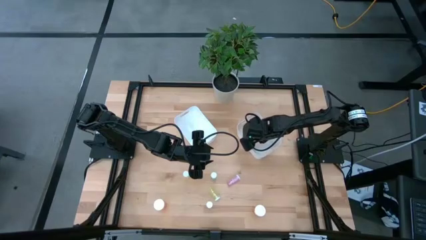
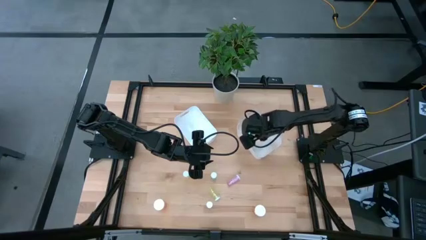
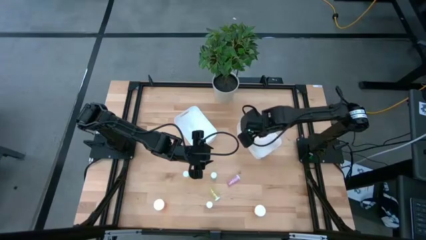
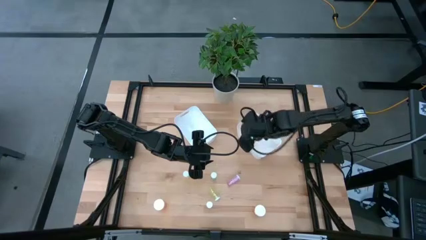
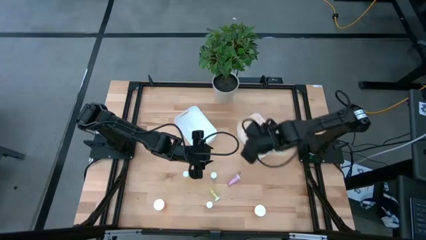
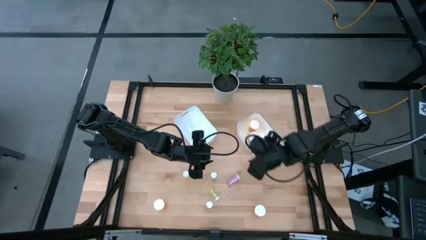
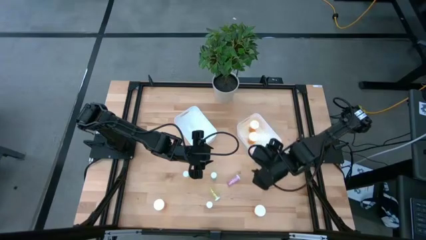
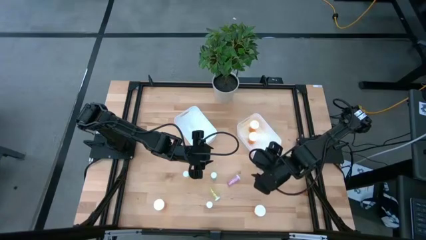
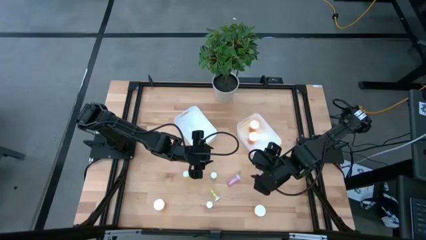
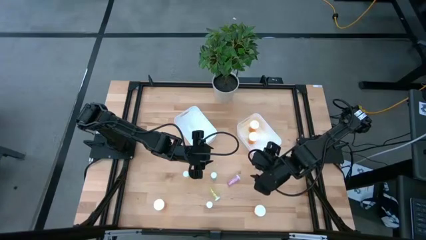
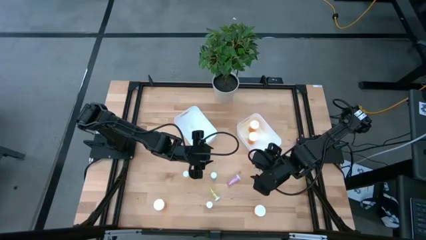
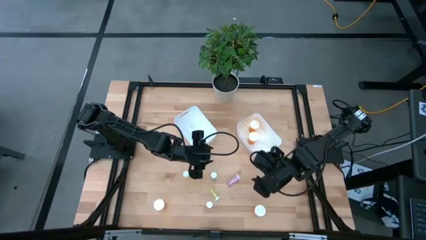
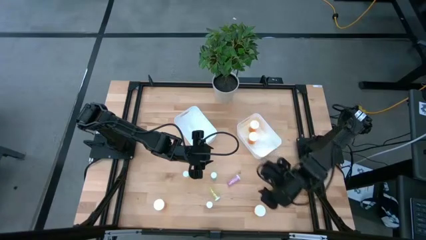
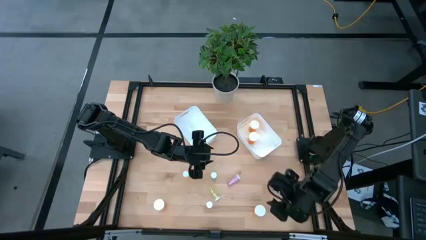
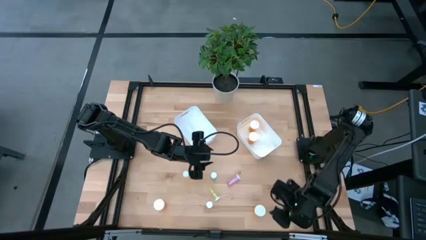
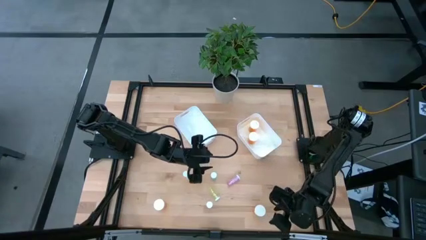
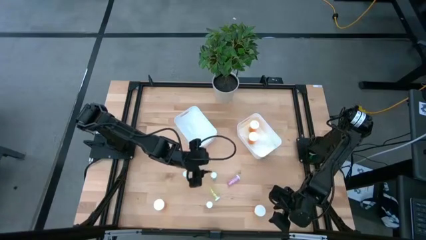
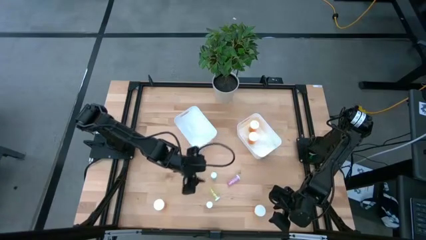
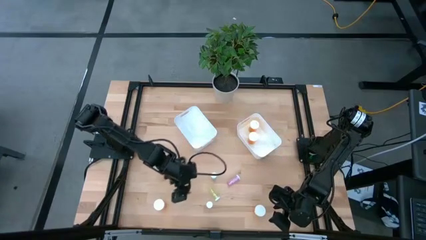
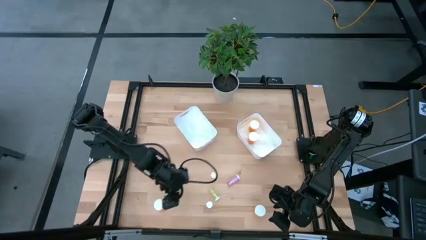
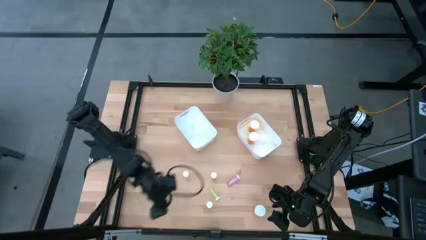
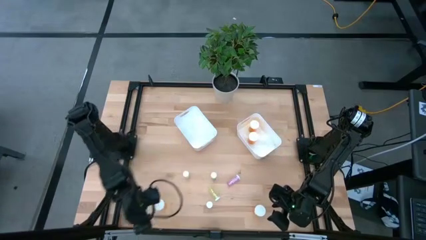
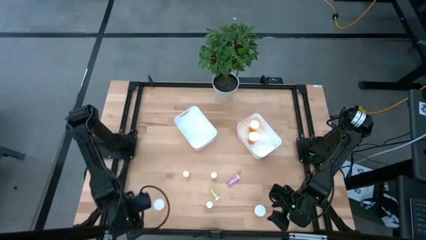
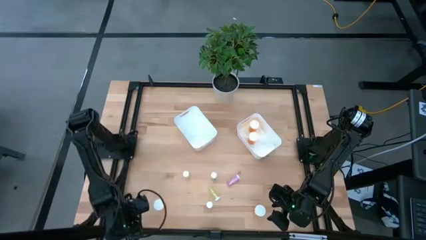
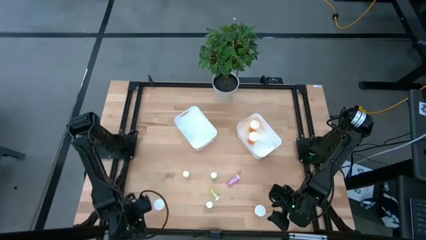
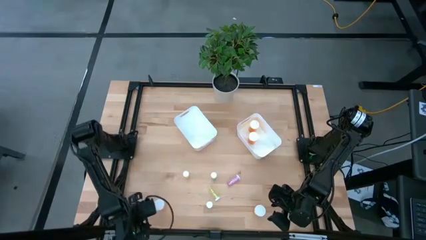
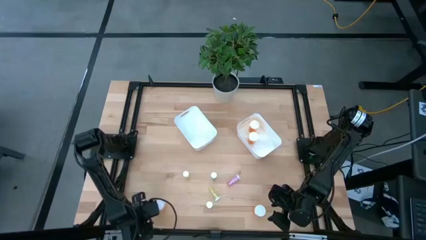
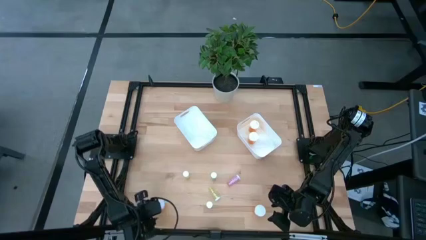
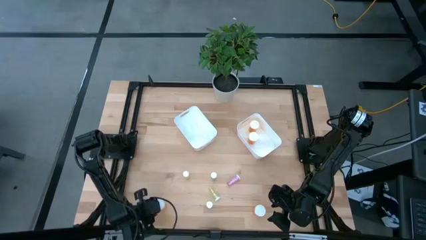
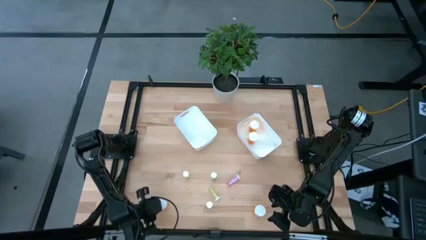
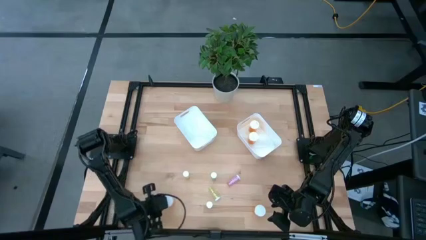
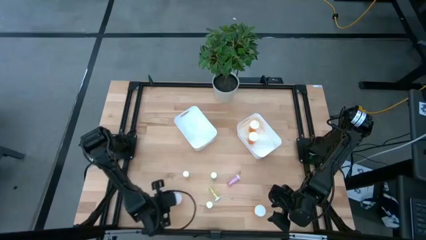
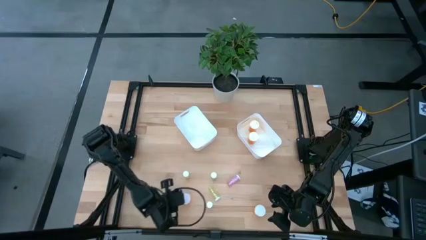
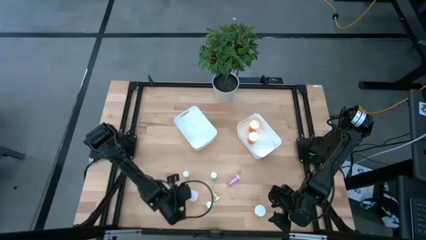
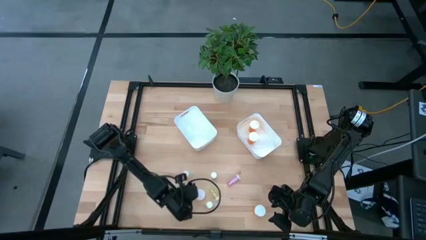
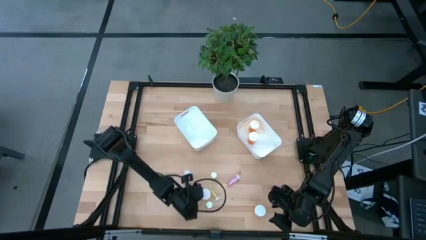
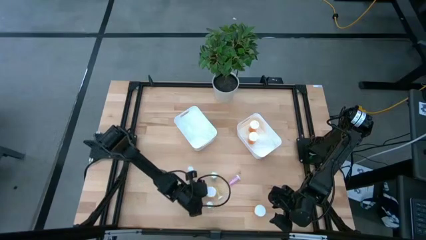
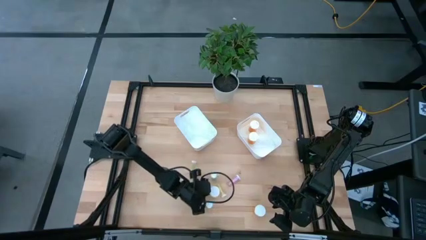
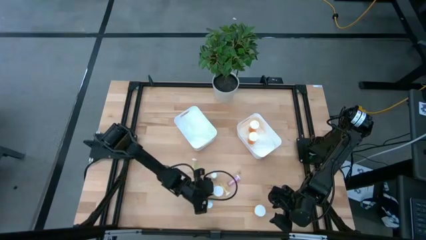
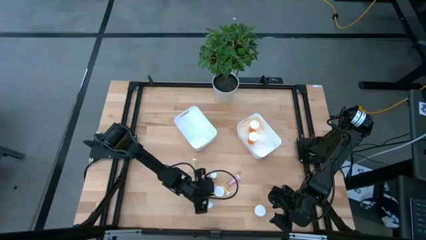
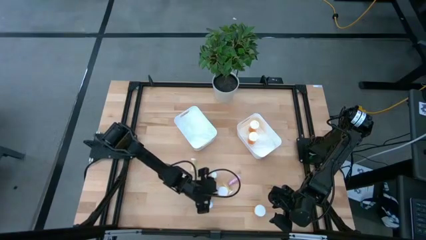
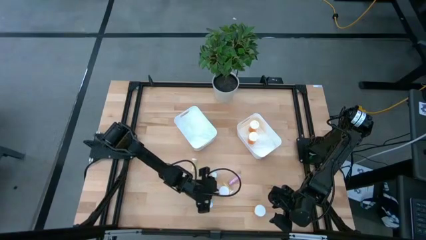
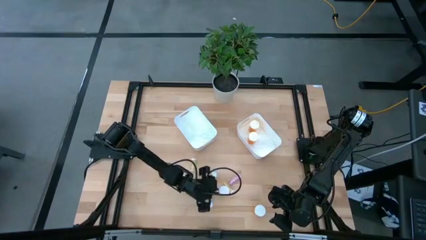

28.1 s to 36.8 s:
Task: Pick and place medicine bottles into bin by pill shape (circle, oval)
Move the left orange pill bottle to the bottom center of the table

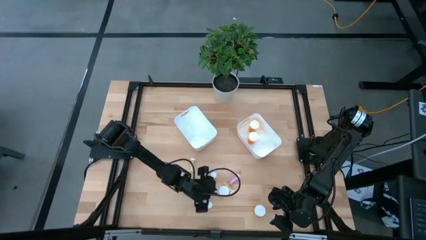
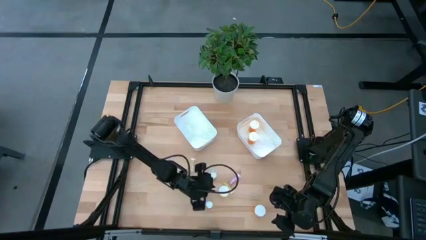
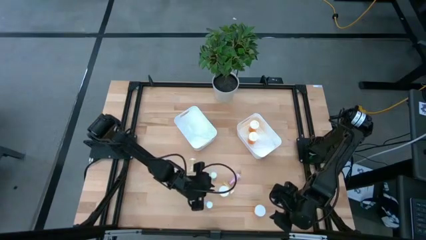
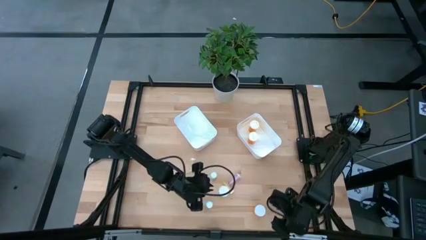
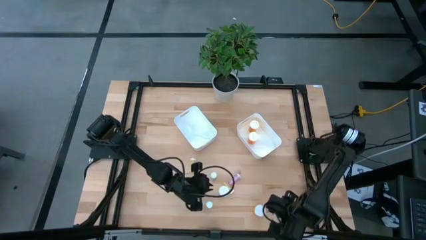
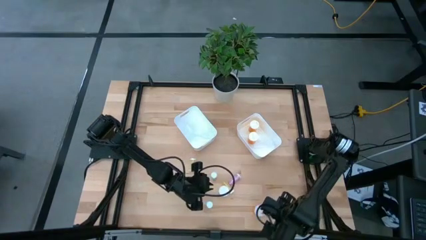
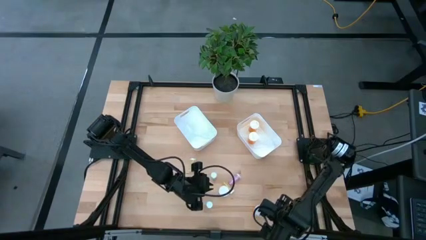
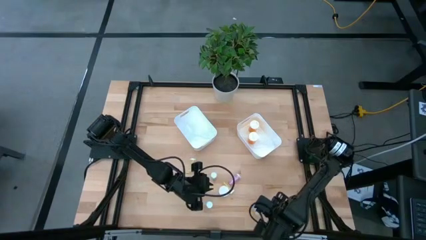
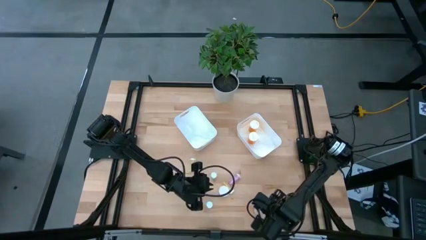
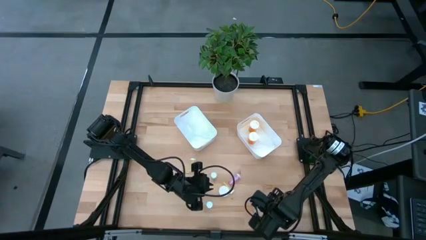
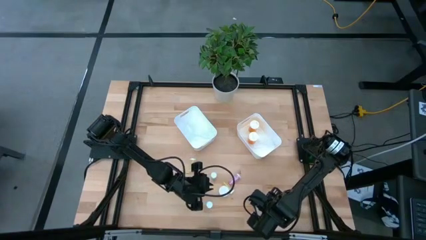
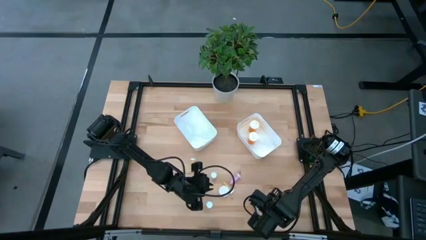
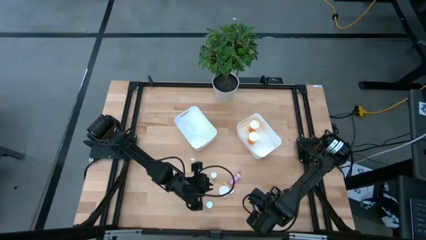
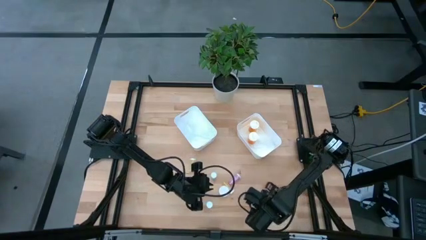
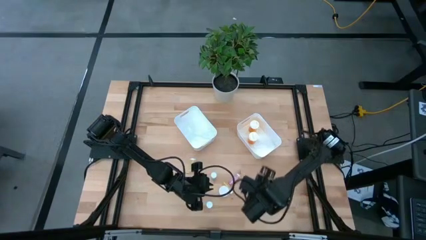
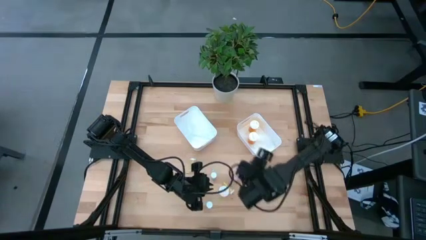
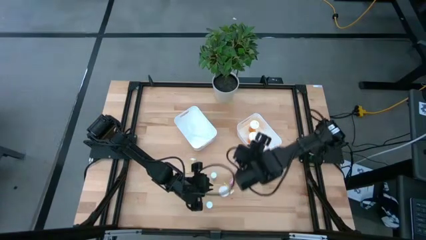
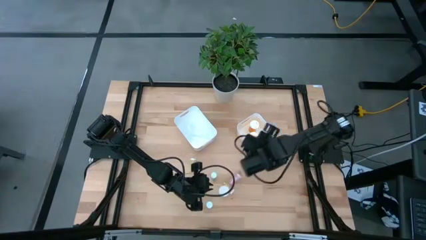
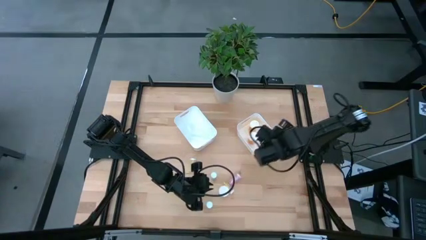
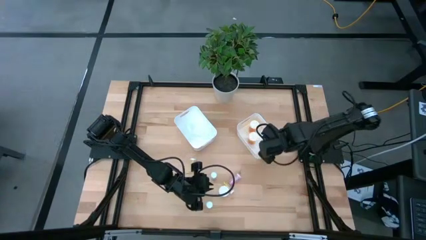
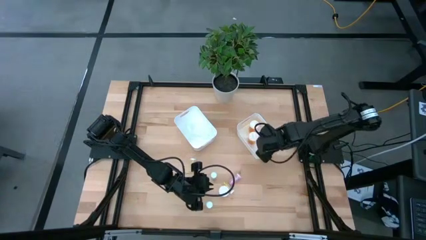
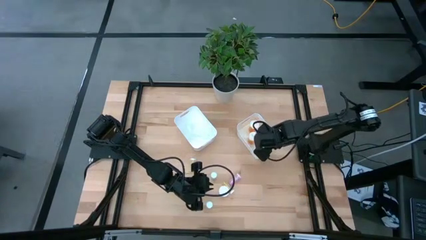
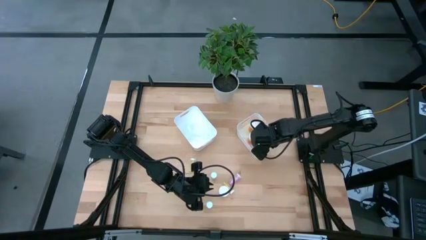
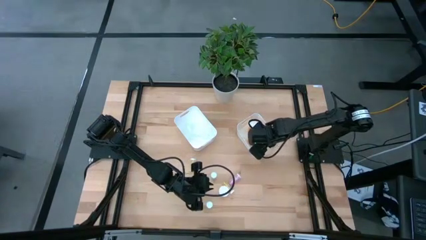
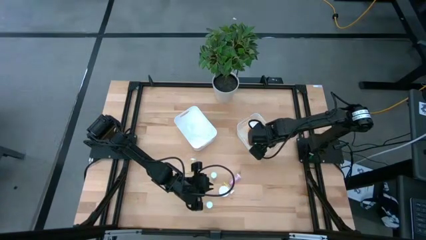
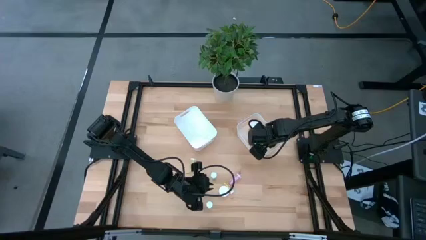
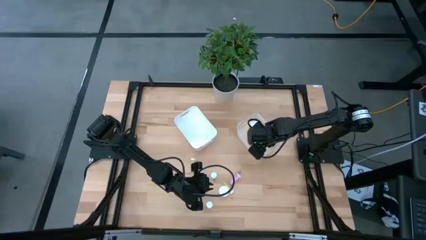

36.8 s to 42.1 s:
Put the right orange pill bottle into the right white bin

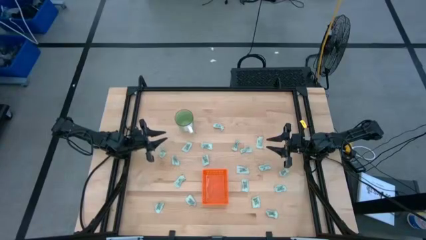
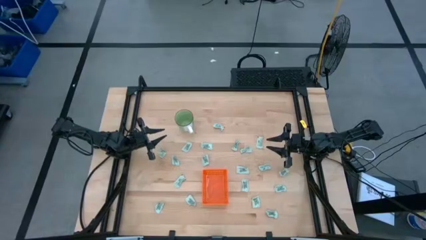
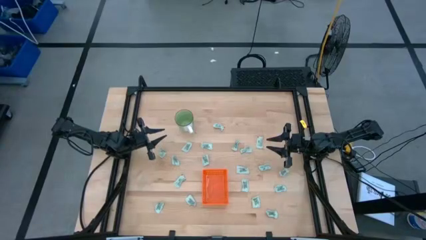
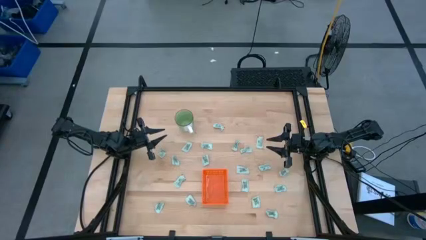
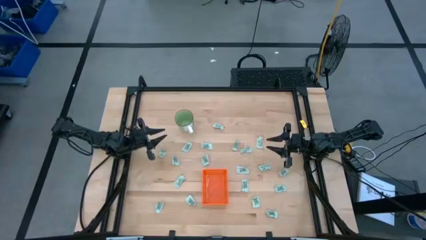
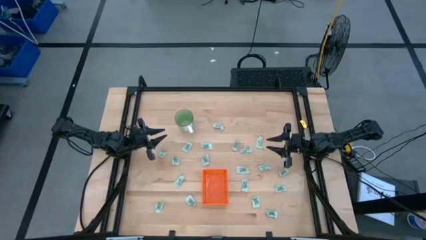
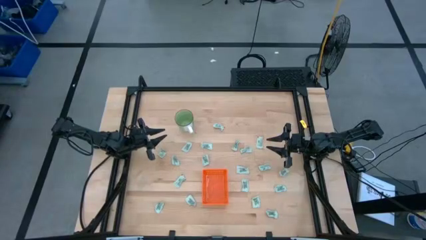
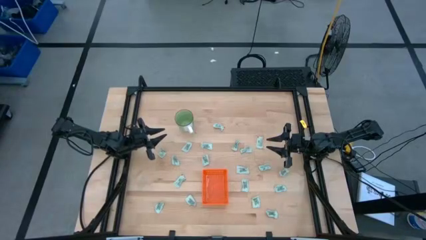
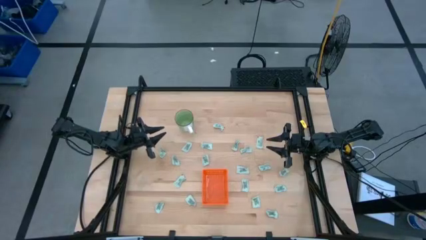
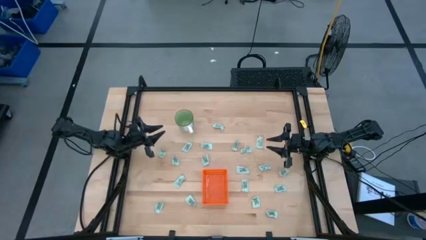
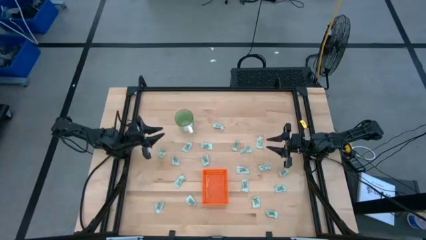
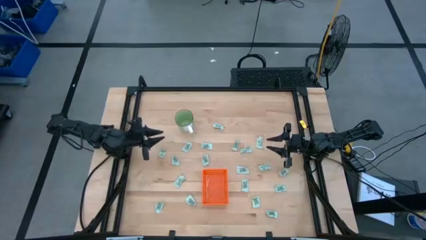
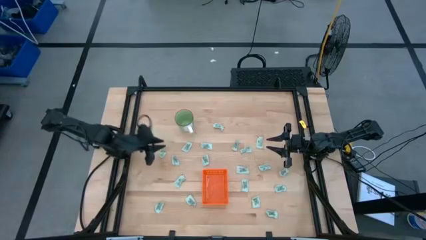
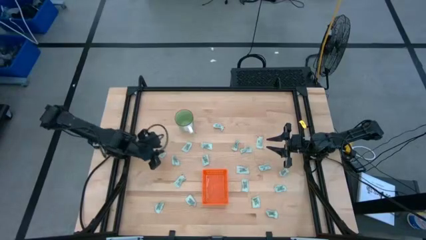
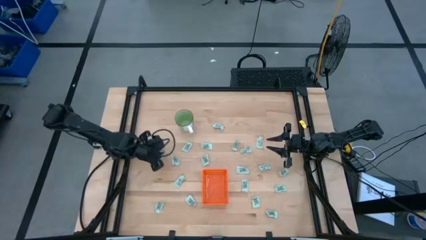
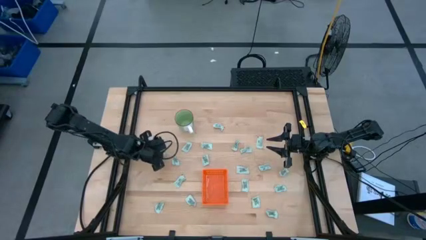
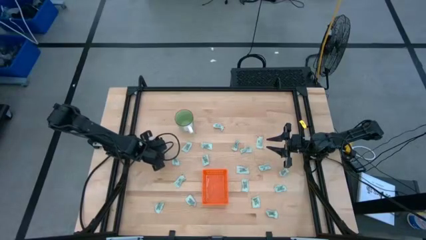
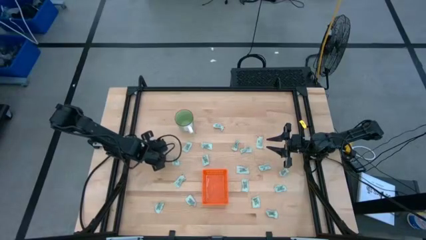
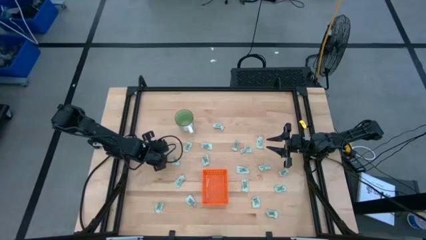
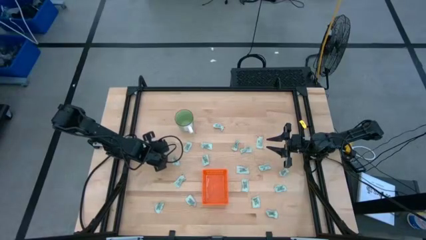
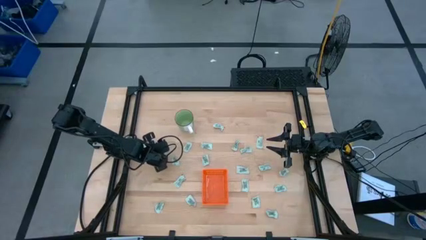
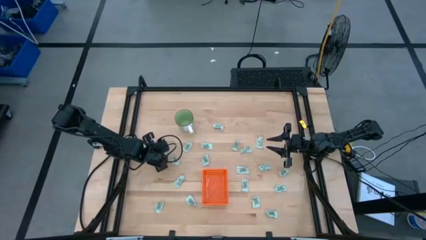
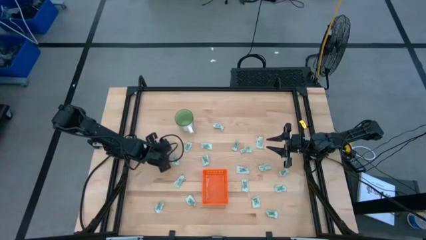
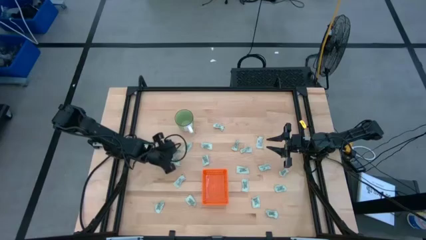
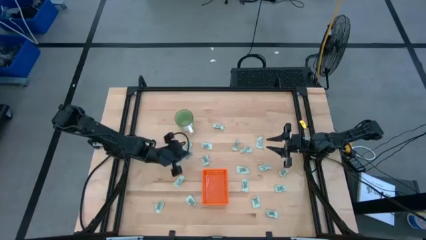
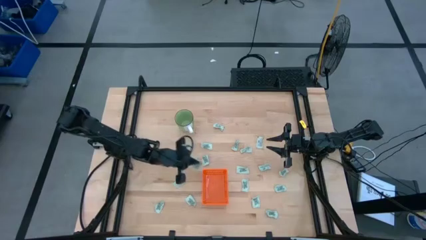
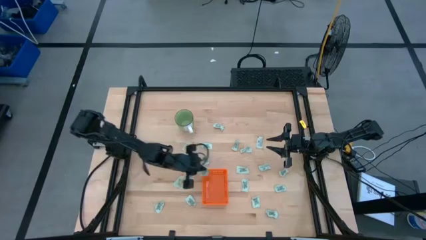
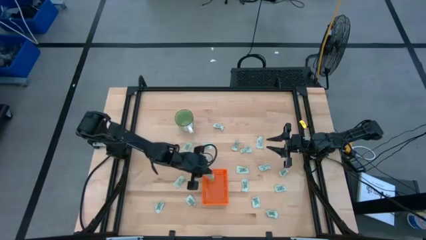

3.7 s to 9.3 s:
Task: Pick and place Stevia / Truvia into bins
Put the stevia packet into the orange basket
